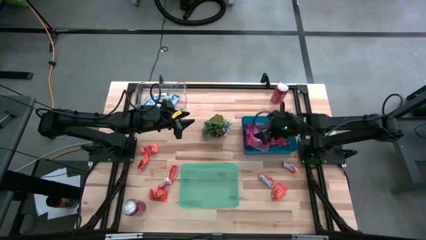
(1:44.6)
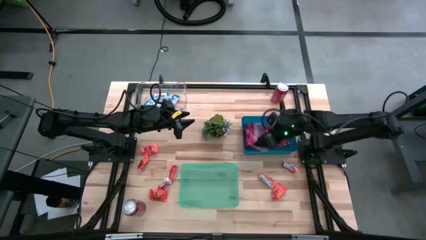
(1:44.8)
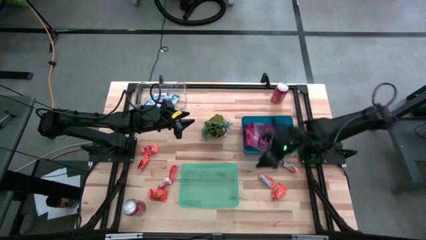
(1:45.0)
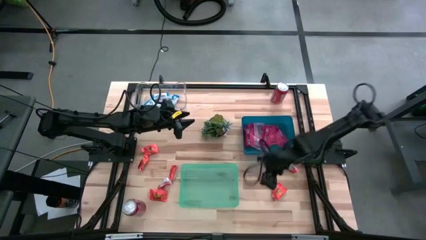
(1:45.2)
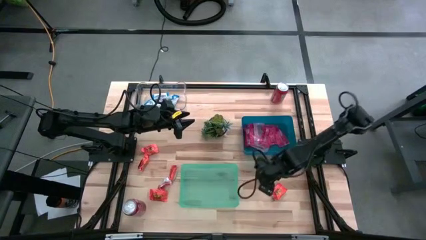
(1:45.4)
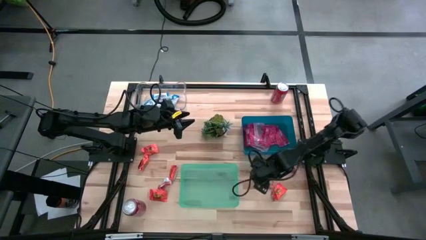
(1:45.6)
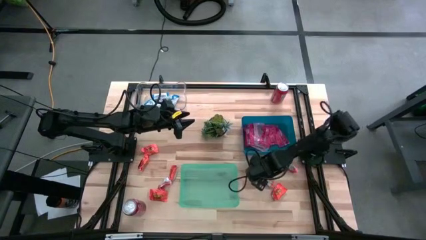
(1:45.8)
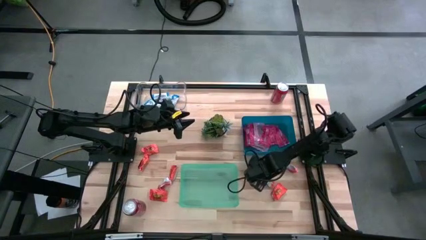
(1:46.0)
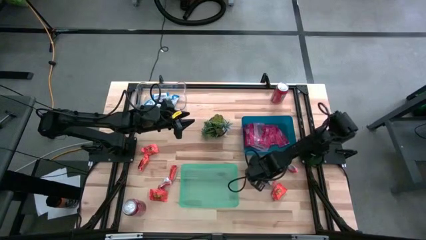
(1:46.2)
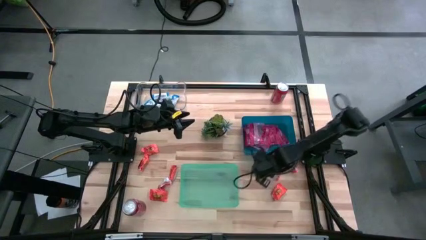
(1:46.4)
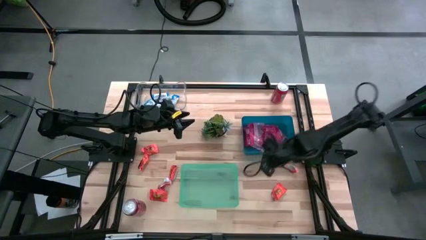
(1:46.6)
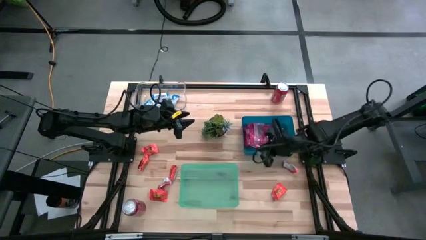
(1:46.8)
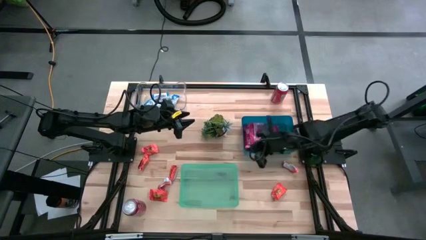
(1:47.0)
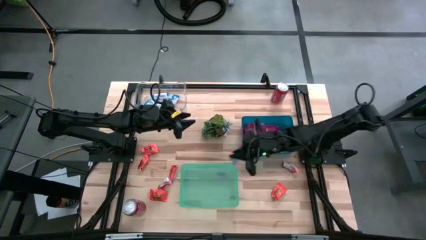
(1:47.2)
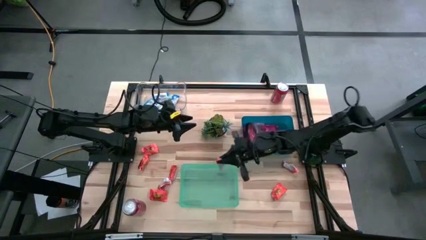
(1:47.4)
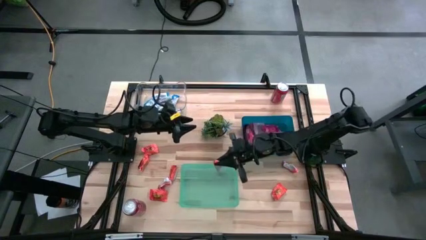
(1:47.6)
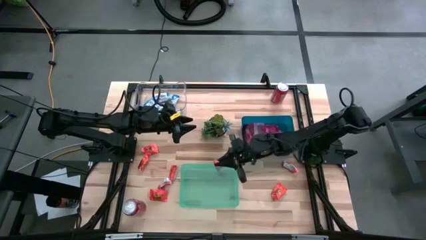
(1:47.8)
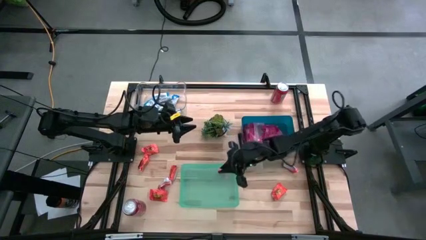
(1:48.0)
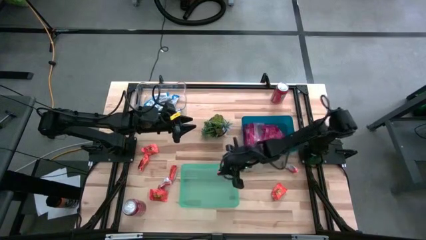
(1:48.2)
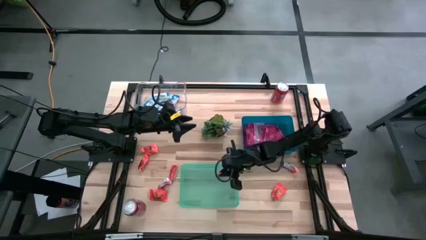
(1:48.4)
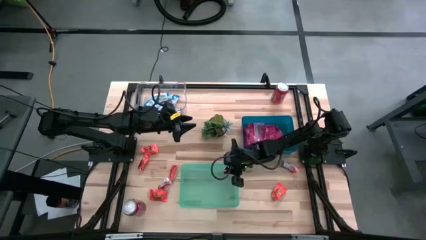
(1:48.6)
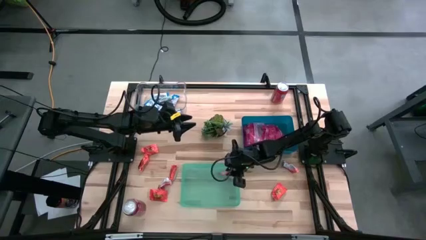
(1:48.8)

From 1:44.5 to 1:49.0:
Task: Sort candy
Put the orange candy into the green transparent bin

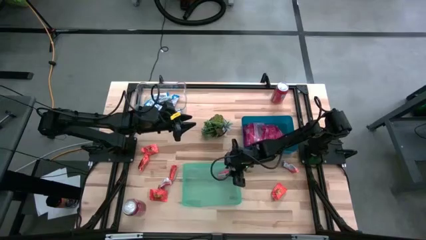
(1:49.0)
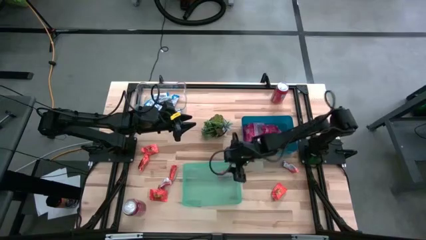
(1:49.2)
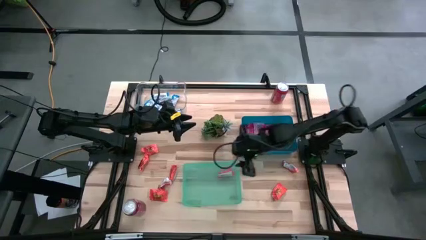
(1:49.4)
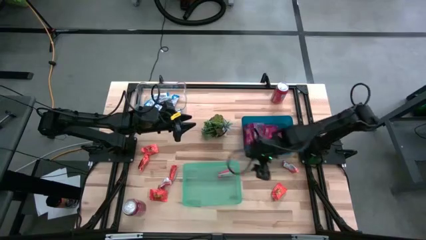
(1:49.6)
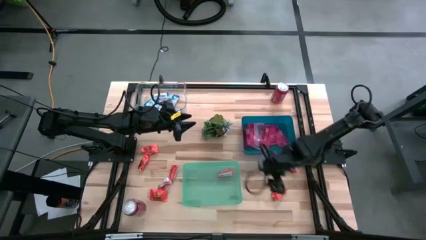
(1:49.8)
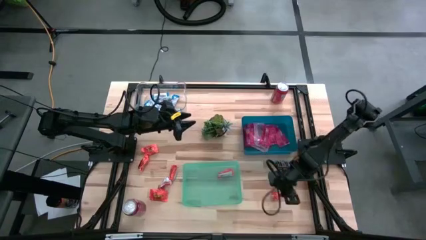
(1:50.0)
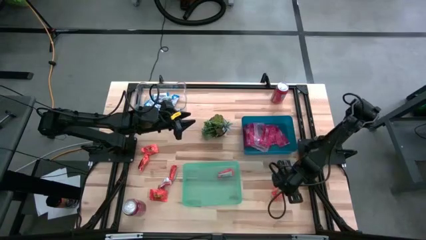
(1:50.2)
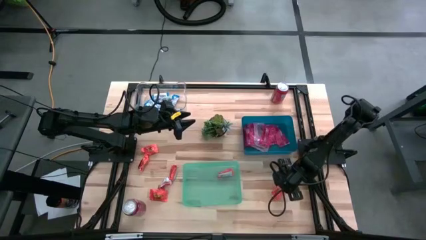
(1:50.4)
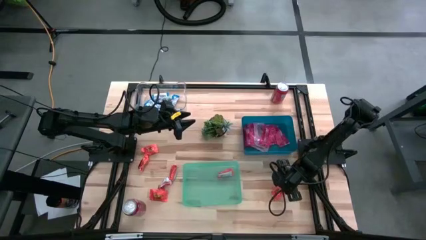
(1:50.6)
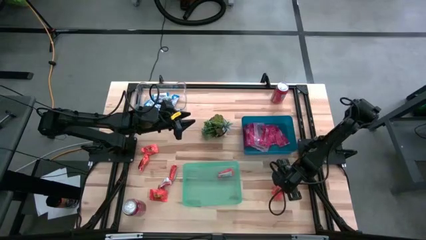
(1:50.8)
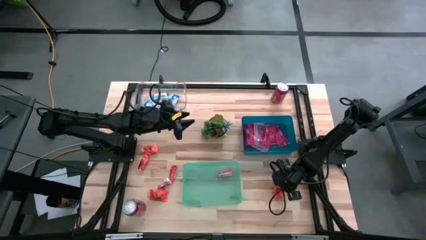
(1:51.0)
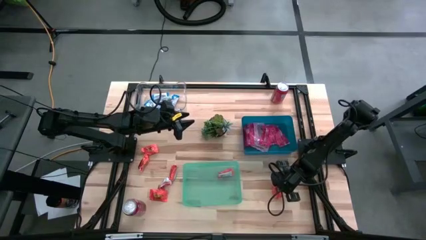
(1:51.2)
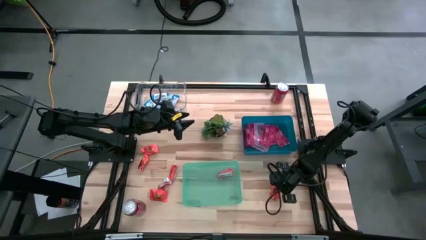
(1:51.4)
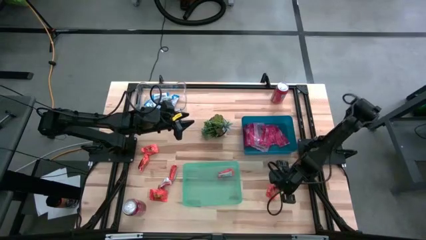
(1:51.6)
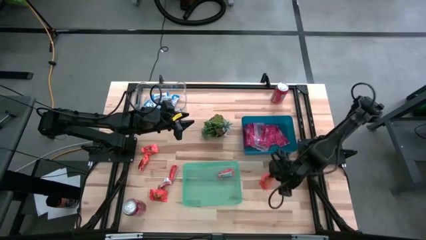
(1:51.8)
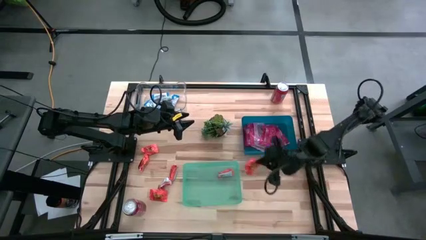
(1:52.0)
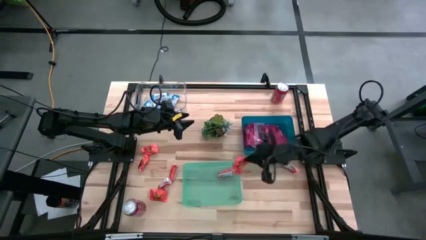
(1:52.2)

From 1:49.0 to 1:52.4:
Put the orange candy into the green transparent bin

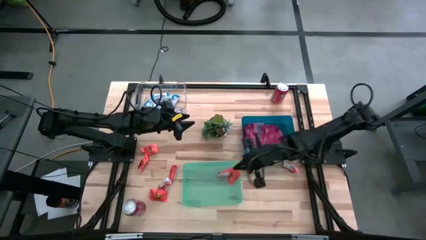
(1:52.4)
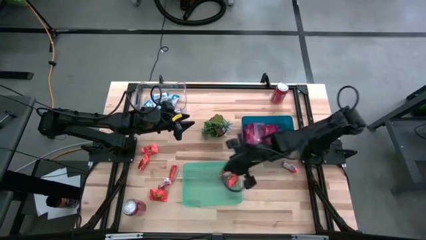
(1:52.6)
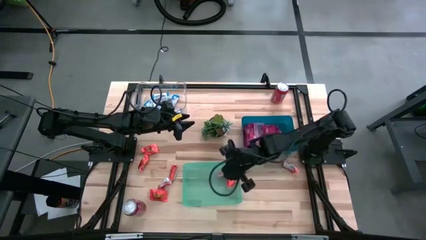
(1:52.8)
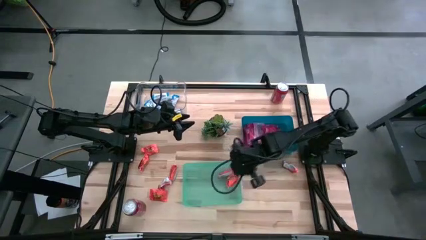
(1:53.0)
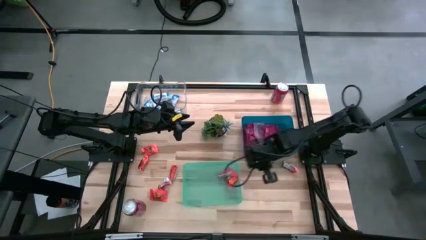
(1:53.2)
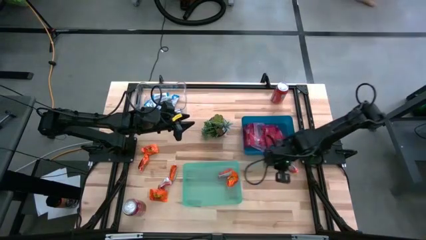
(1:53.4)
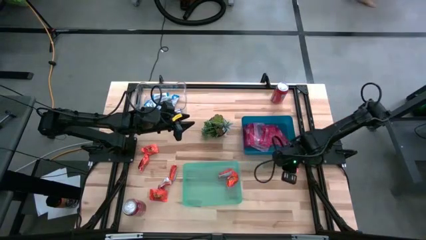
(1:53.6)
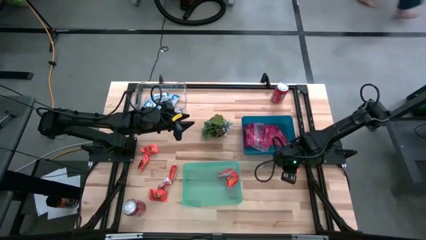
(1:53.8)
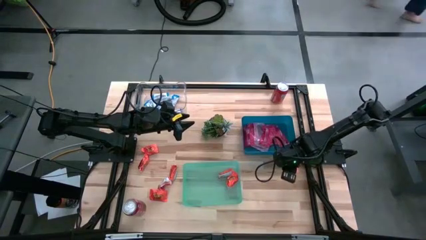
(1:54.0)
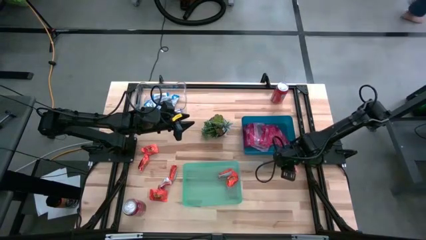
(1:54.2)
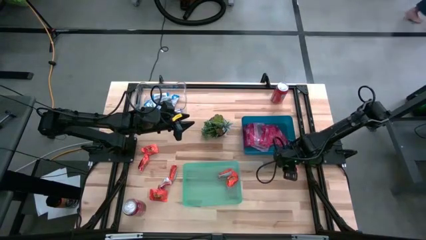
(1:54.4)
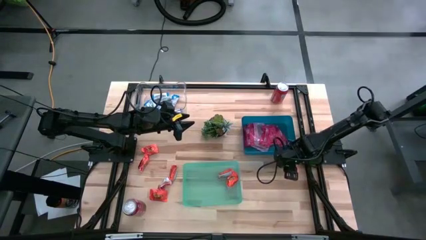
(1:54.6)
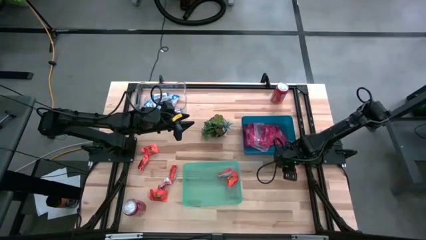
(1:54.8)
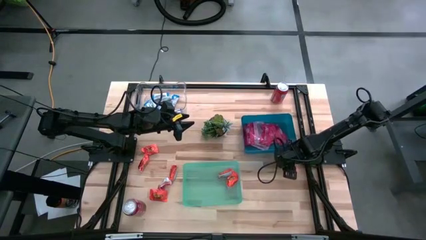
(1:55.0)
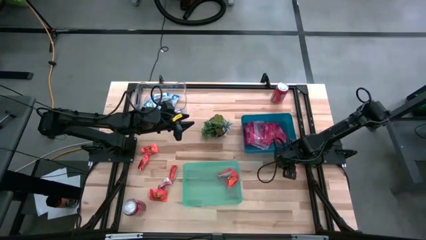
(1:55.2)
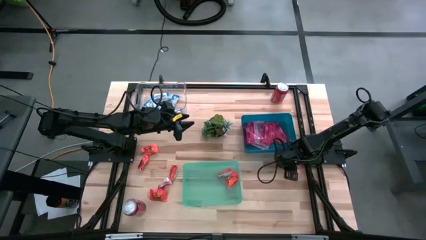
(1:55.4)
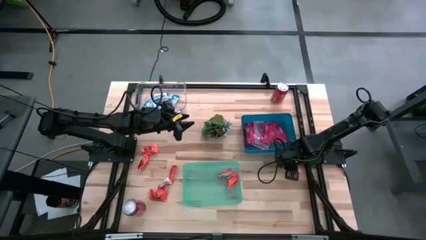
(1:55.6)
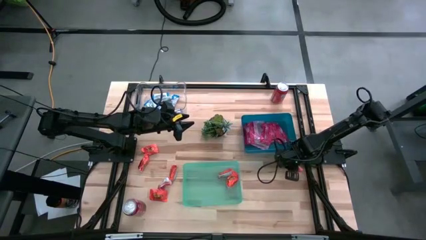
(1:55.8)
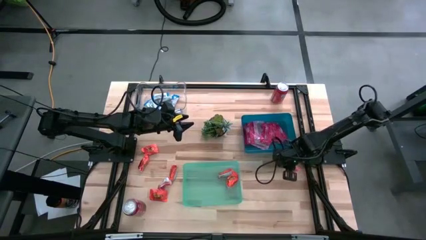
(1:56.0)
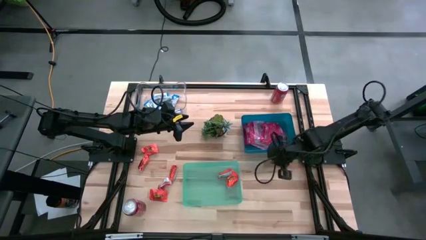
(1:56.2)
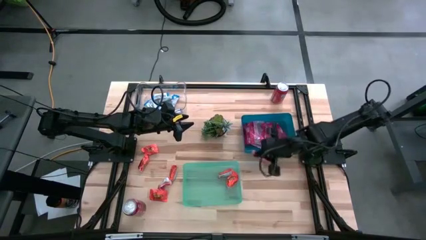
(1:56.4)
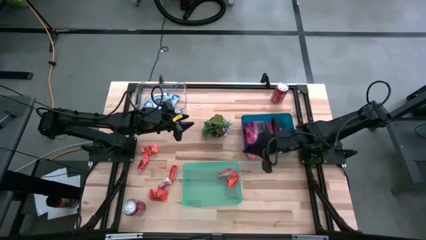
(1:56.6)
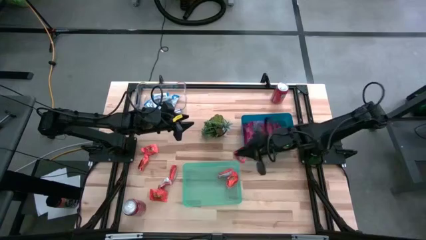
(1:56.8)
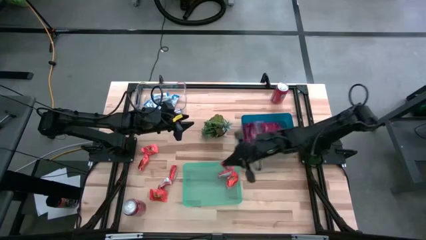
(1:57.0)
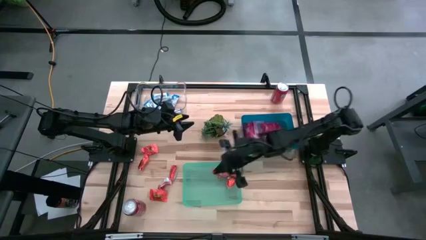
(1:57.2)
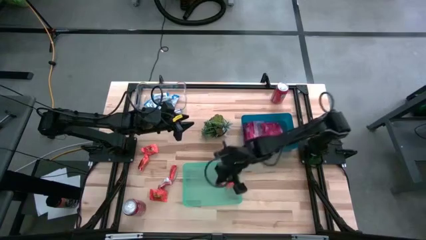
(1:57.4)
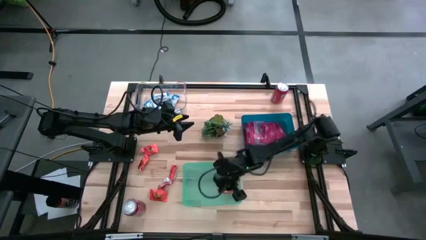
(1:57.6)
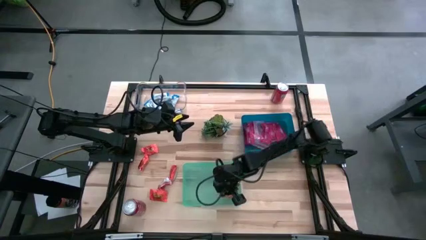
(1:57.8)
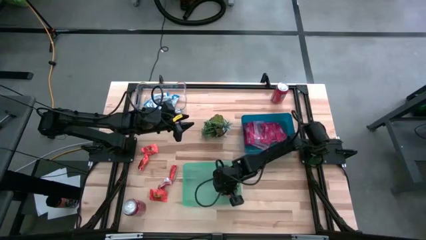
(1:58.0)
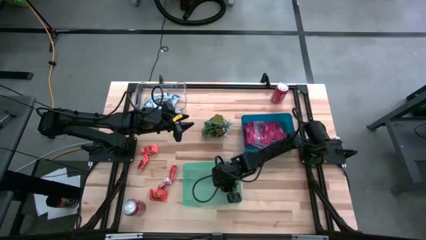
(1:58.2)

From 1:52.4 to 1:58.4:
Put the orange candy into the green transparent bin

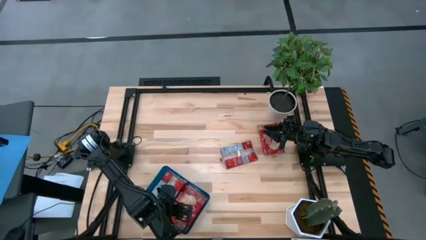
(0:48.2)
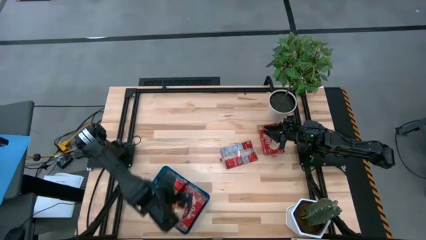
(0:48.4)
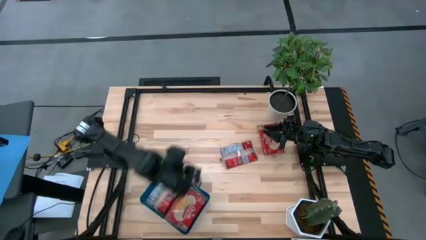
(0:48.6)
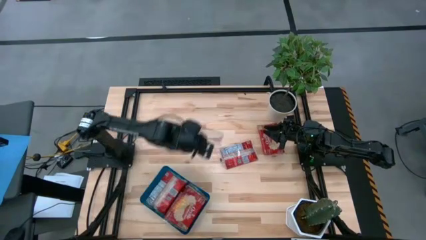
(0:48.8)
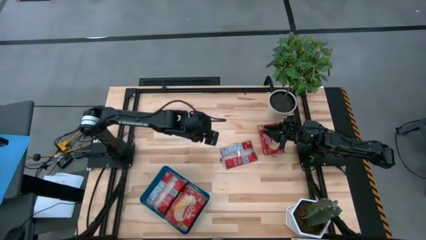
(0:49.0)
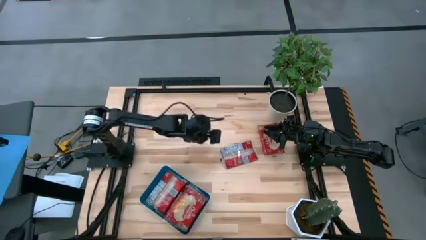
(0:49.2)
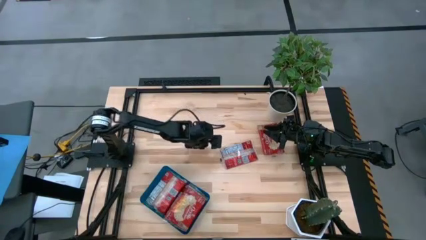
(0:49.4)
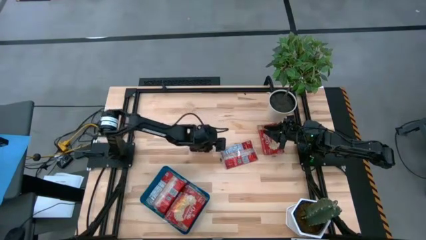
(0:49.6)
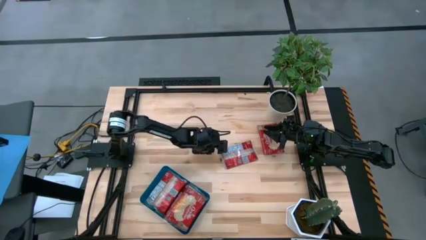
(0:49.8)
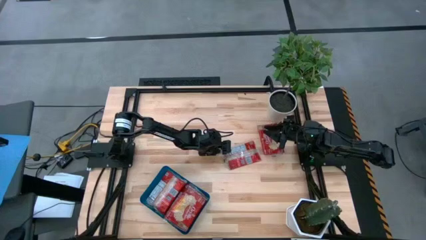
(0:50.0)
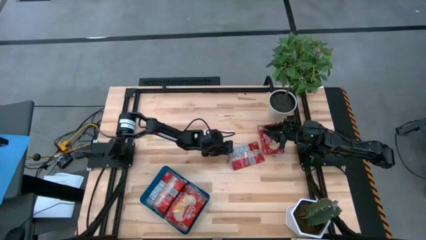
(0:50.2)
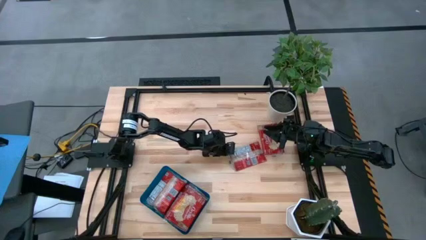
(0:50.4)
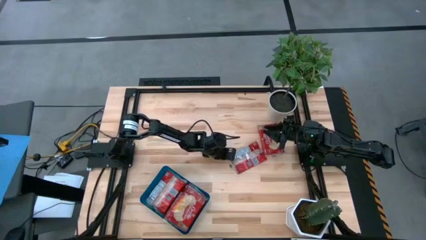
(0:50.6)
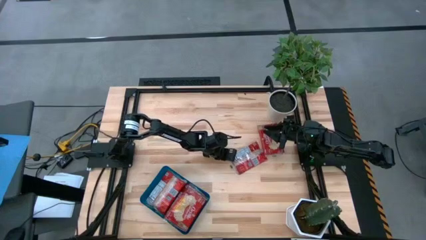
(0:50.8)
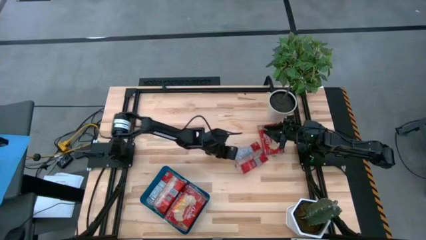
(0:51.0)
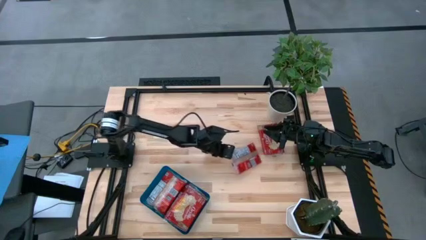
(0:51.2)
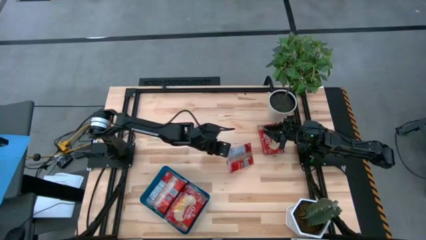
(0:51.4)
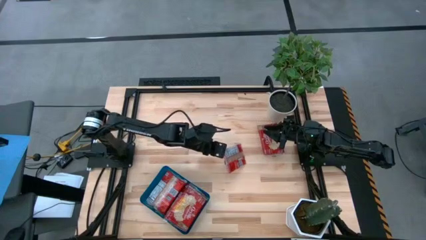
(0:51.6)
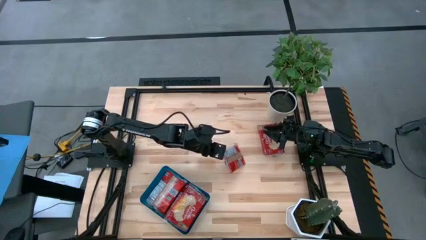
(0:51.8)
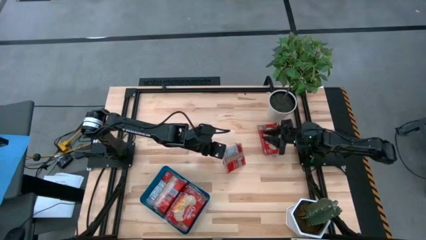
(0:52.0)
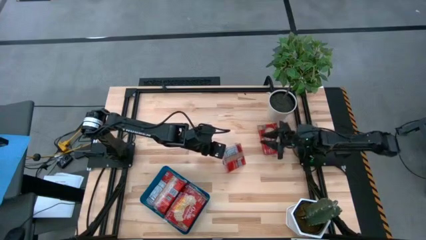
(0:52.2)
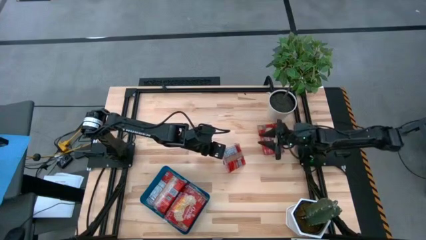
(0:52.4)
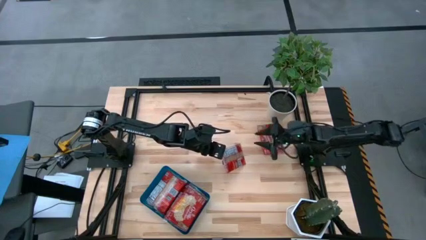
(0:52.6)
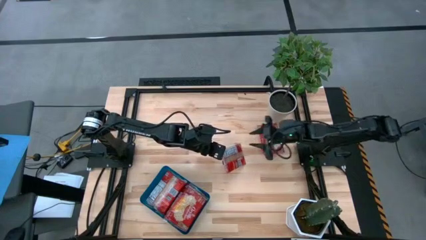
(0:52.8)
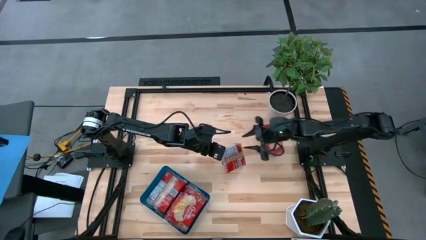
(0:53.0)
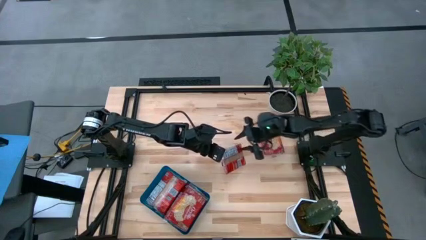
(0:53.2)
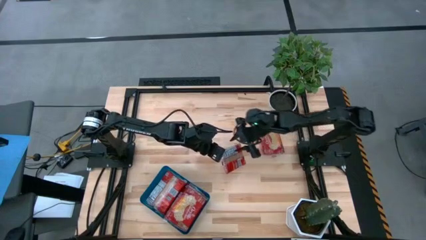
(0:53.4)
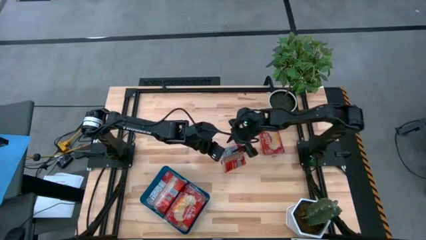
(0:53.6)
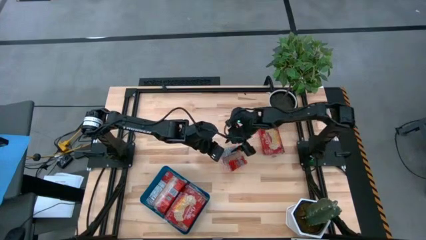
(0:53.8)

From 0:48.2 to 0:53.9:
Task: Sort popcorn bags into baskets
Put the red popcorn bag into the blue bin
